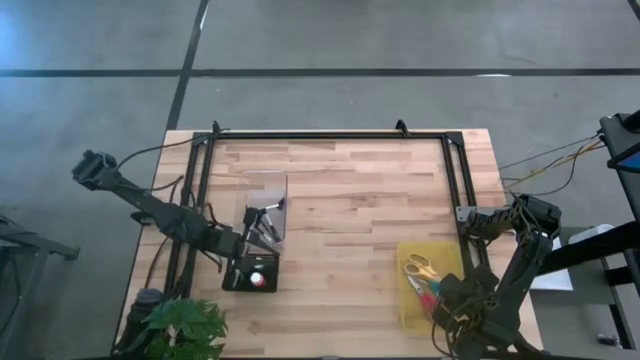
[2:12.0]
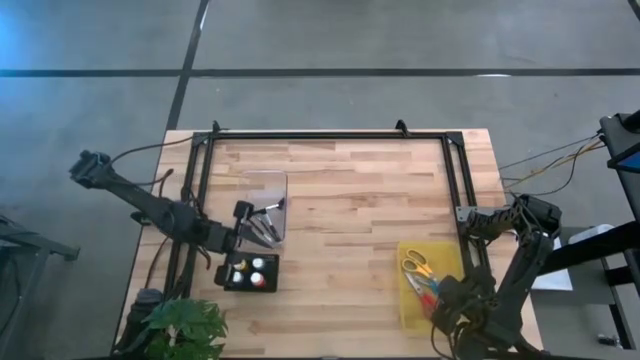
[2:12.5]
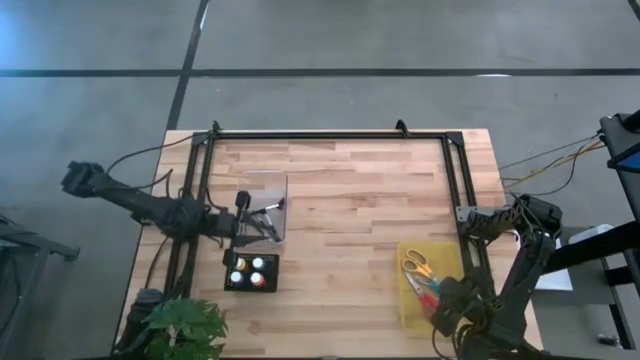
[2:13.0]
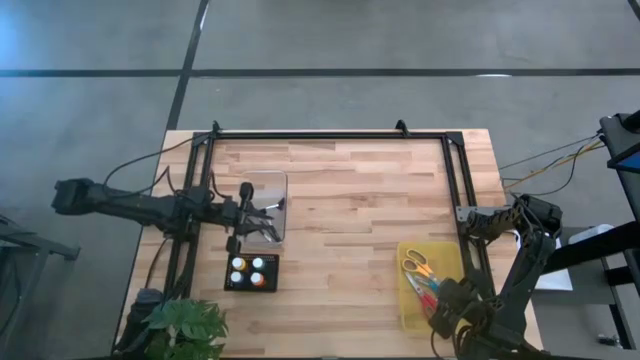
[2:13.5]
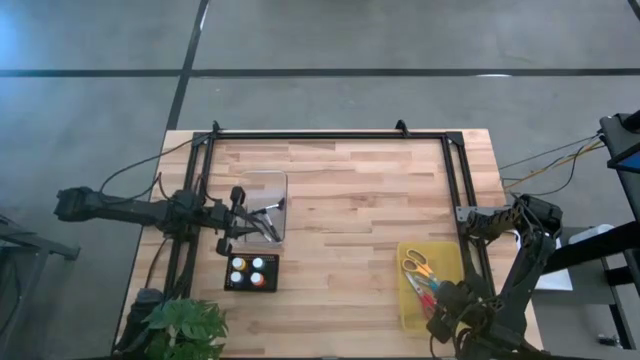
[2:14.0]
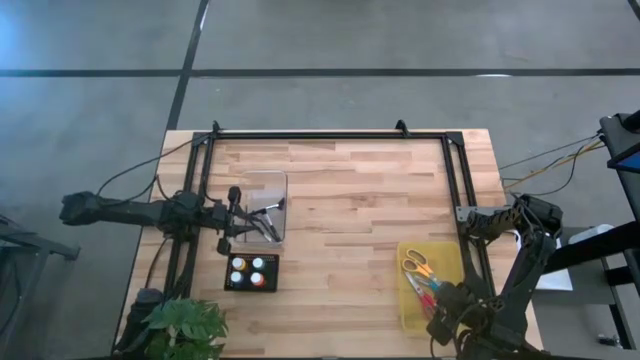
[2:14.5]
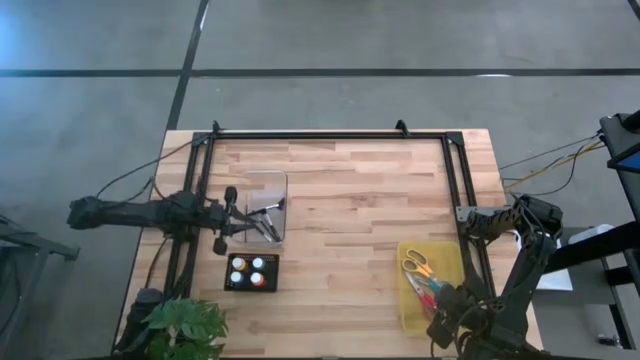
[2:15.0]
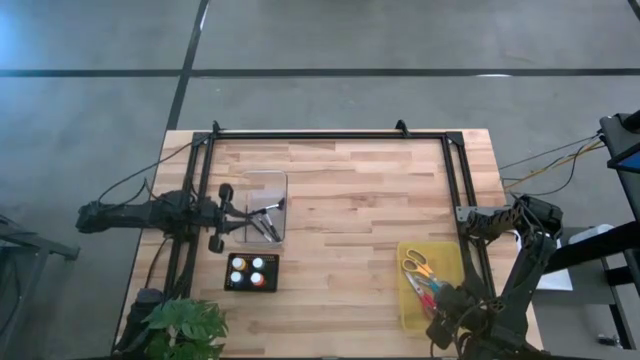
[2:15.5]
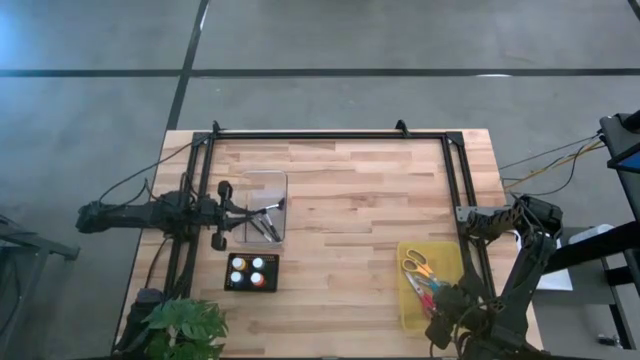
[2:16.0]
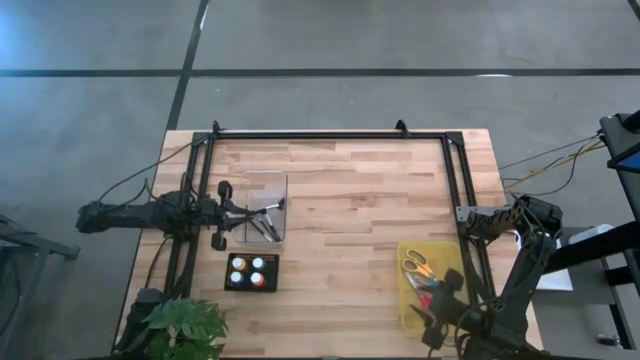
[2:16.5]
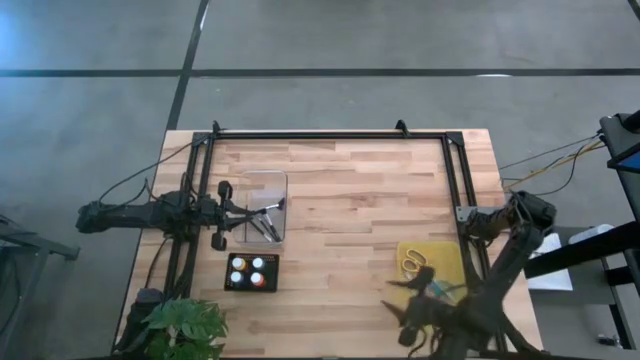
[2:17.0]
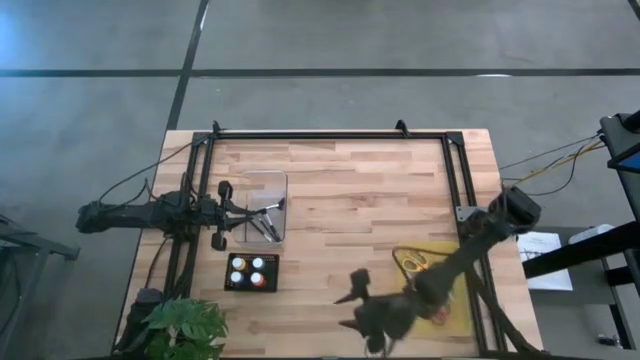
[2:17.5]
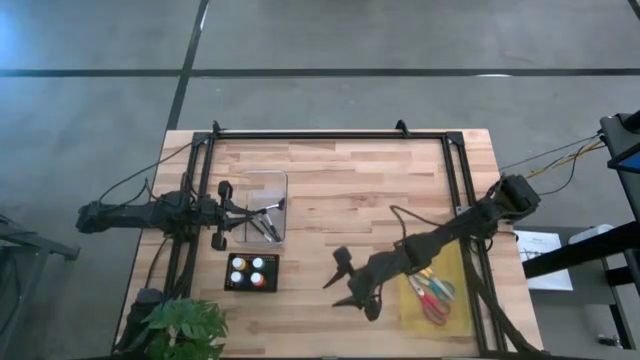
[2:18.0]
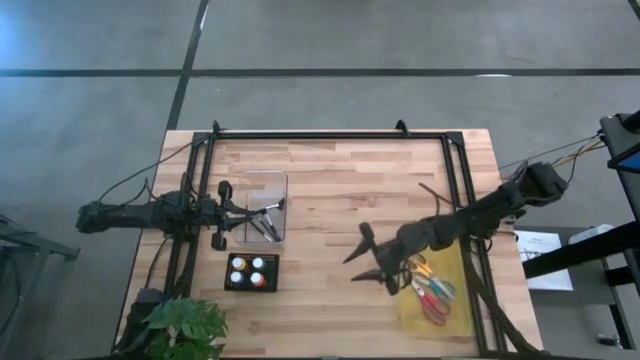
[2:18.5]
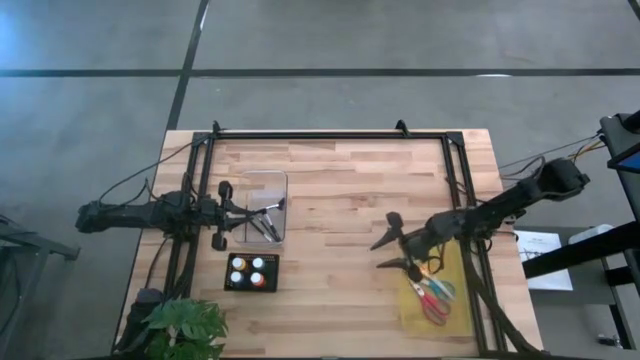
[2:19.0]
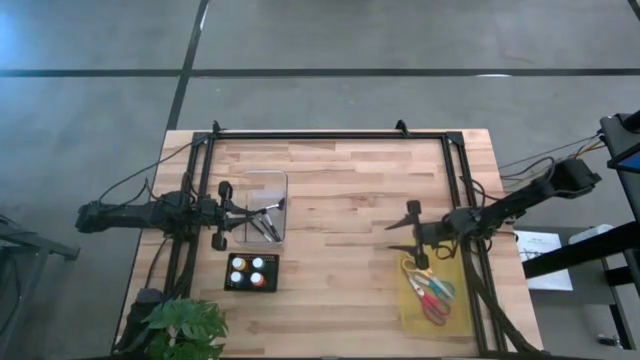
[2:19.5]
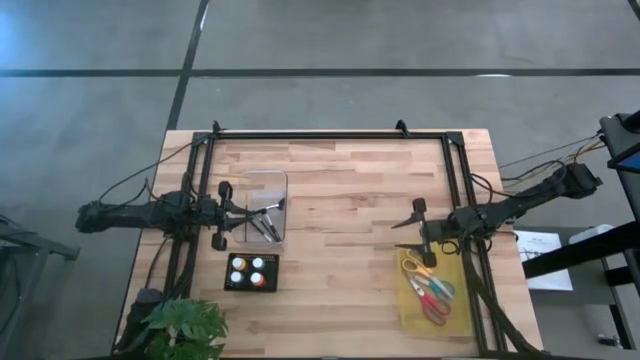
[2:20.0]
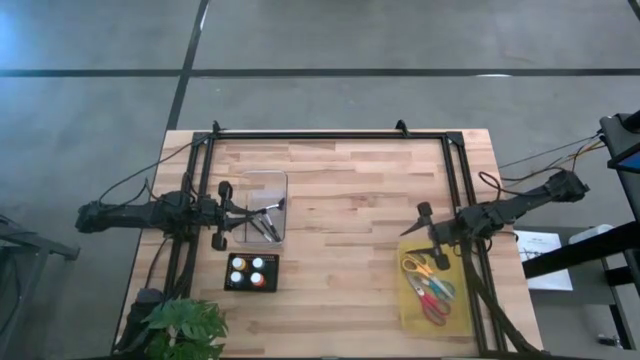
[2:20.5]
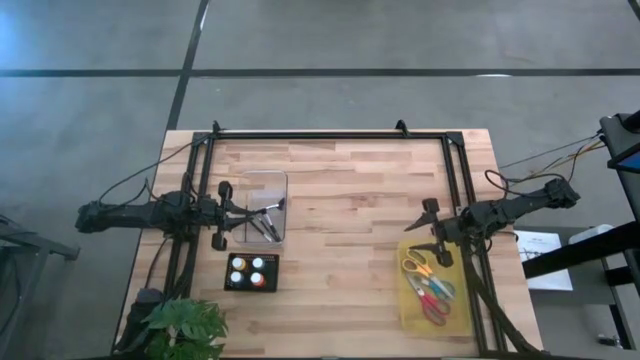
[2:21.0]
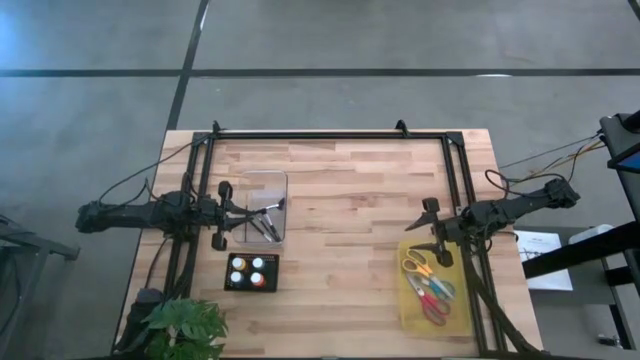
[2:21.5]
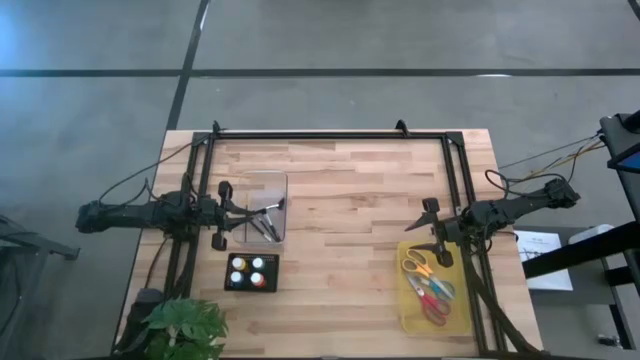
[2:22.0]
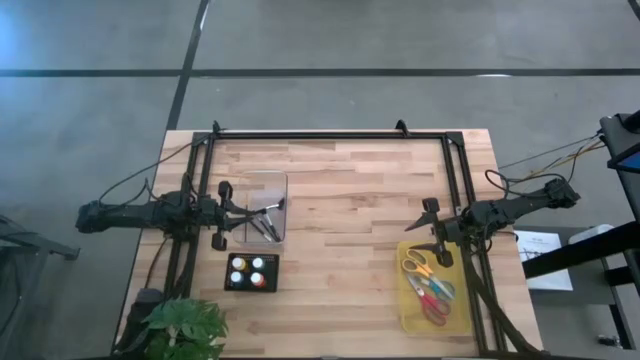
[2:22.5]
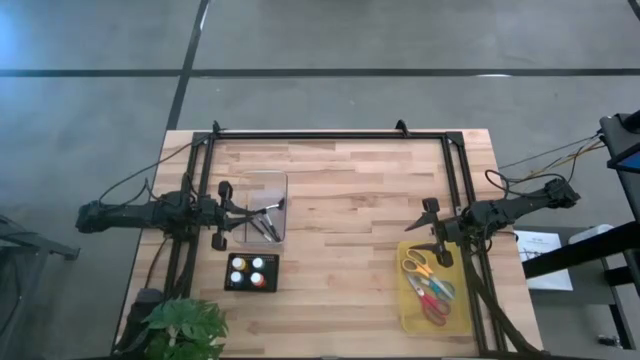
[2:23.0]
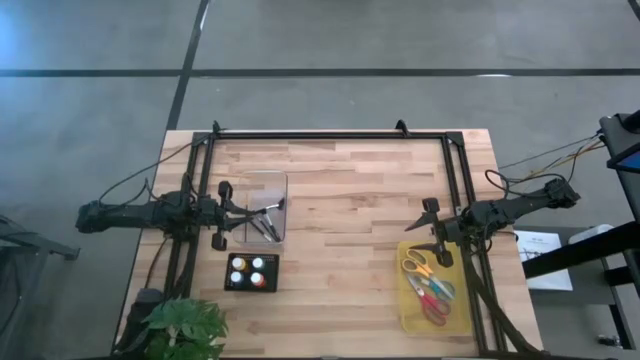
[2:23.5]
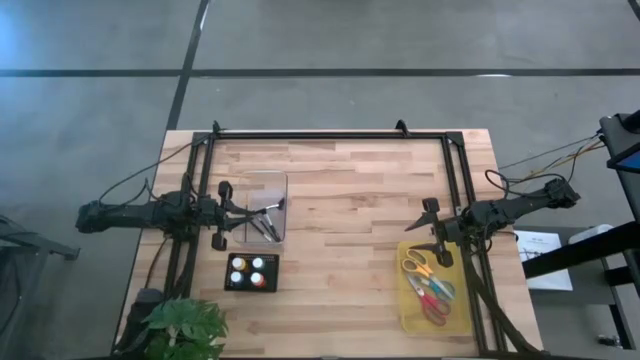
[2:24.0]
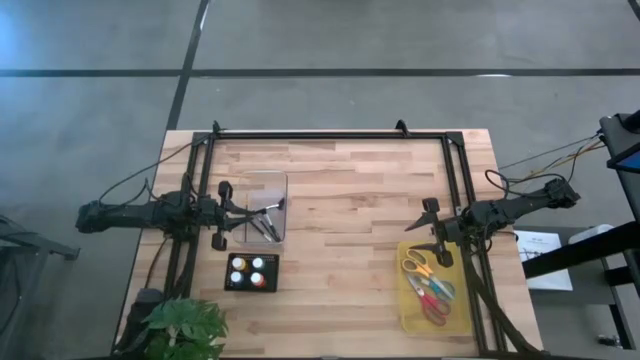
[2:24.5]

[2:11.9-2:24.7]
Task: Pick & Place Paint Supplies
Return to Home Position

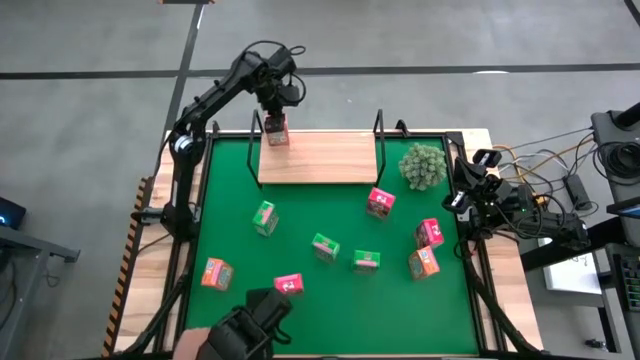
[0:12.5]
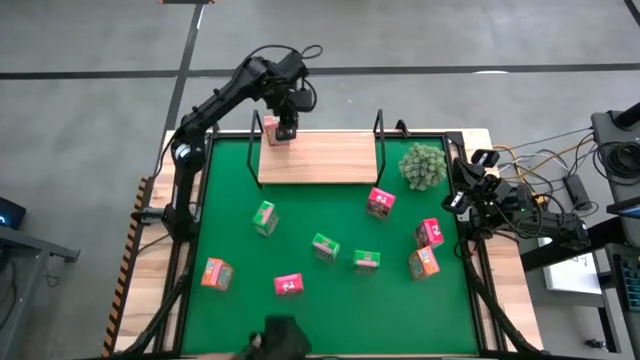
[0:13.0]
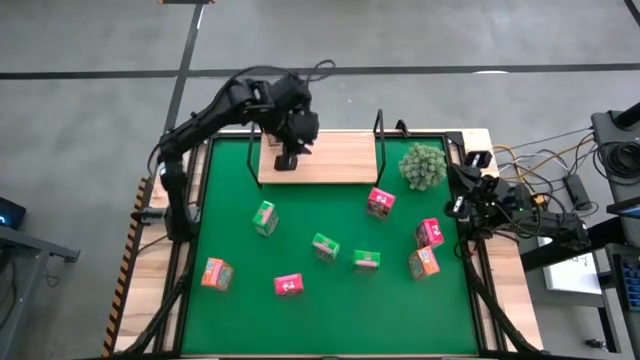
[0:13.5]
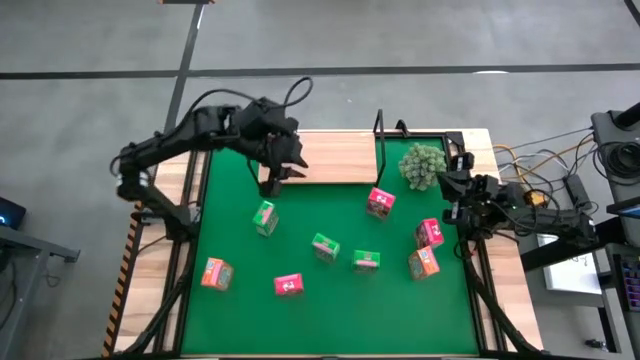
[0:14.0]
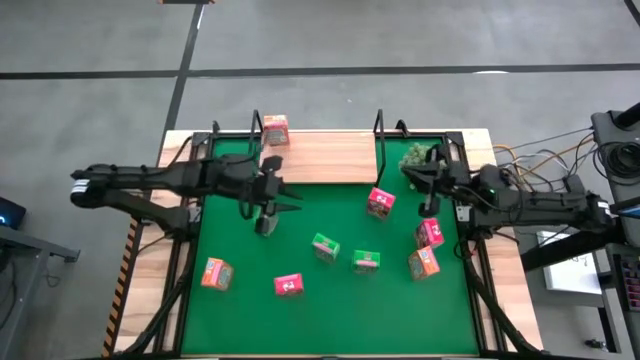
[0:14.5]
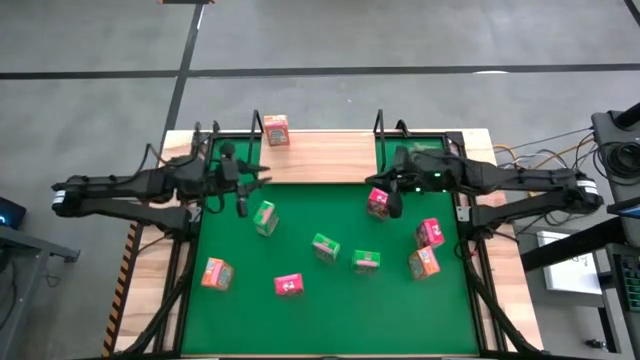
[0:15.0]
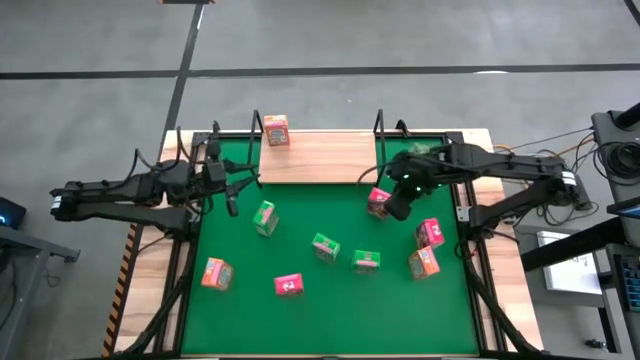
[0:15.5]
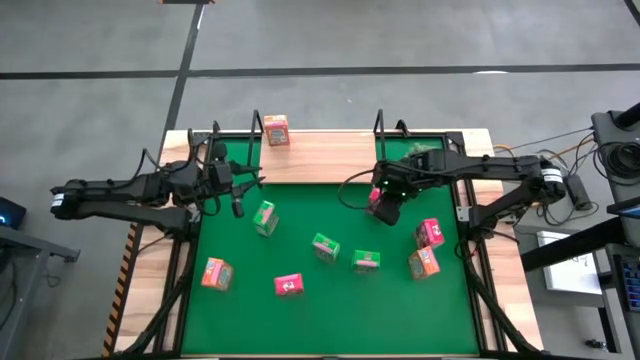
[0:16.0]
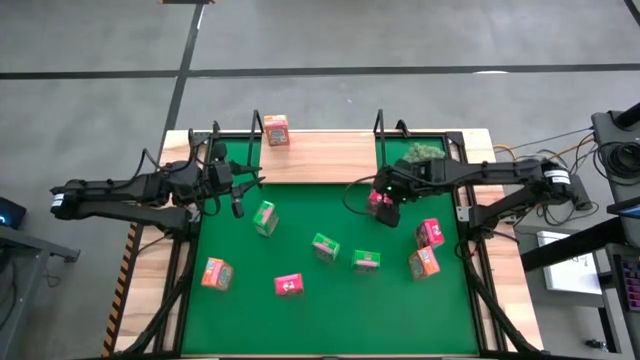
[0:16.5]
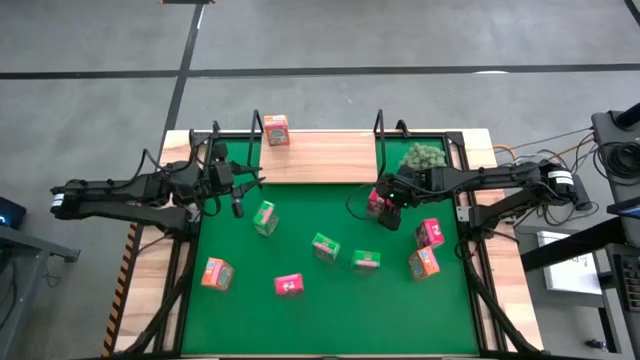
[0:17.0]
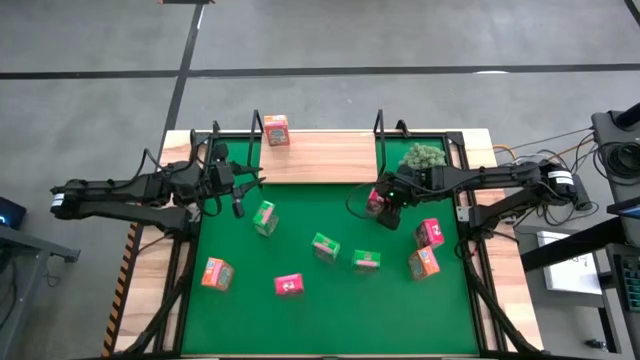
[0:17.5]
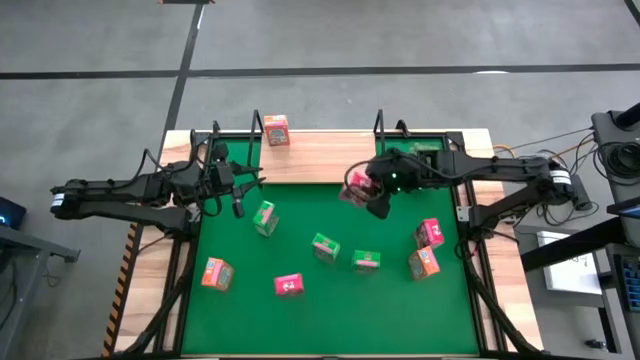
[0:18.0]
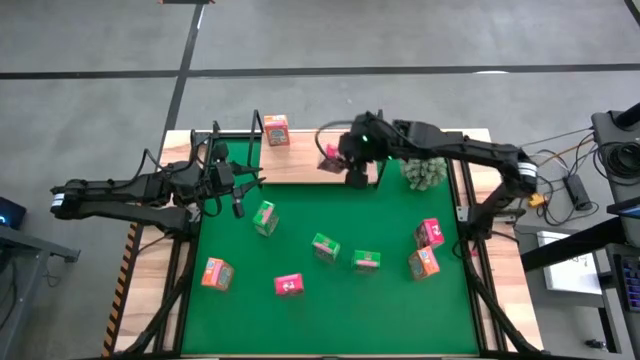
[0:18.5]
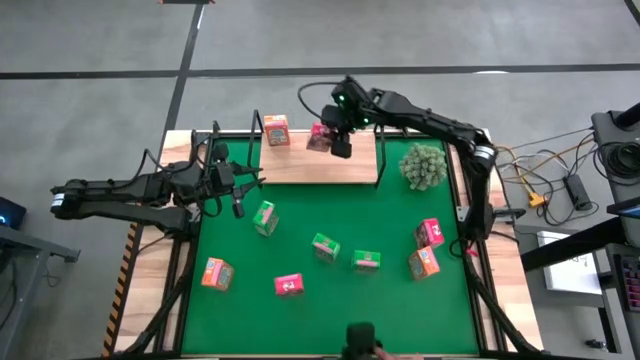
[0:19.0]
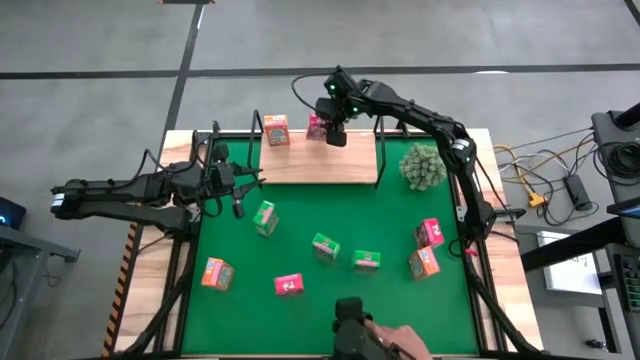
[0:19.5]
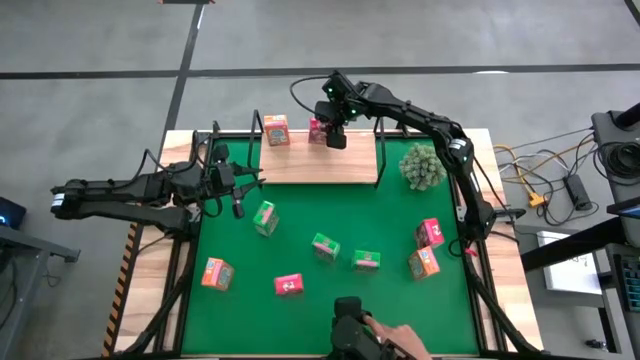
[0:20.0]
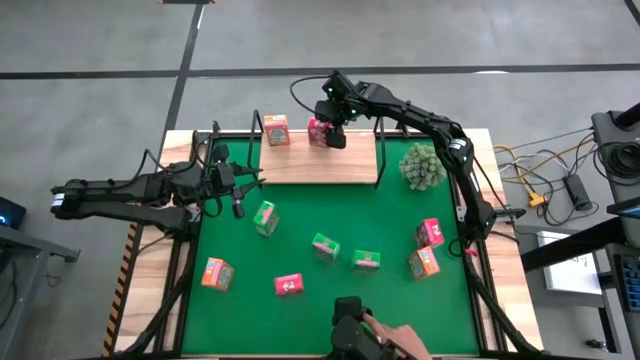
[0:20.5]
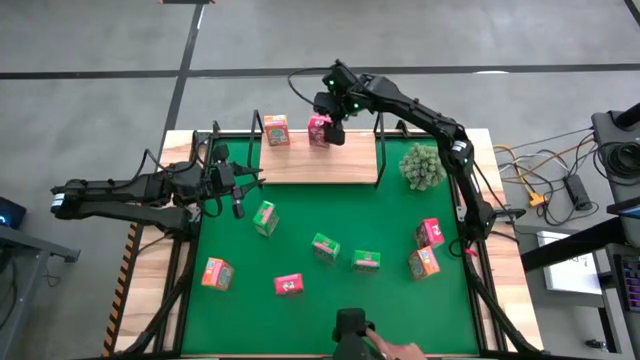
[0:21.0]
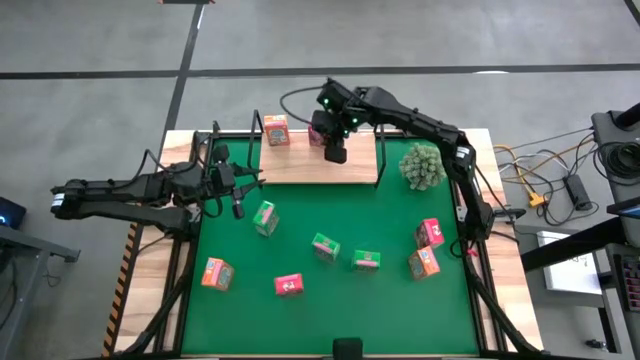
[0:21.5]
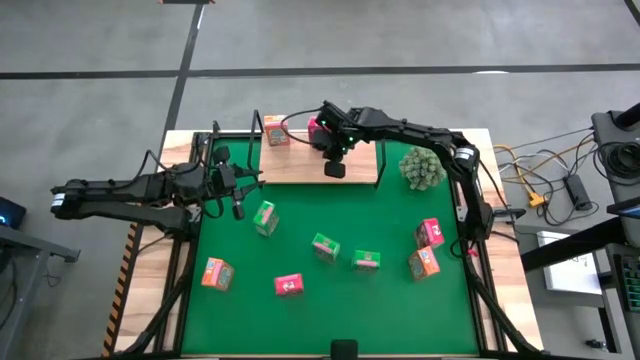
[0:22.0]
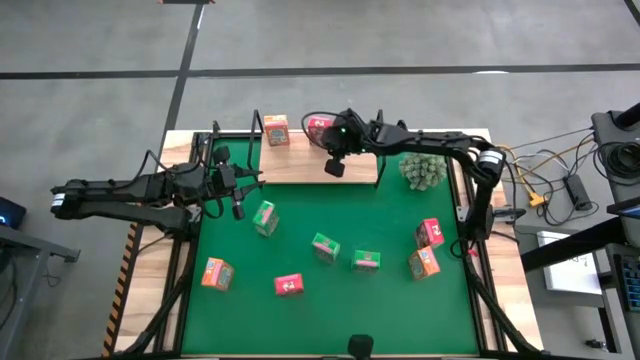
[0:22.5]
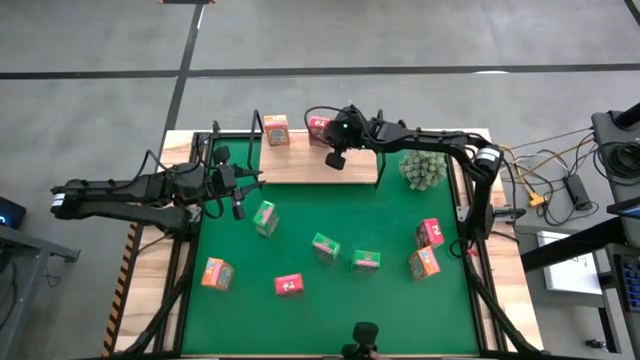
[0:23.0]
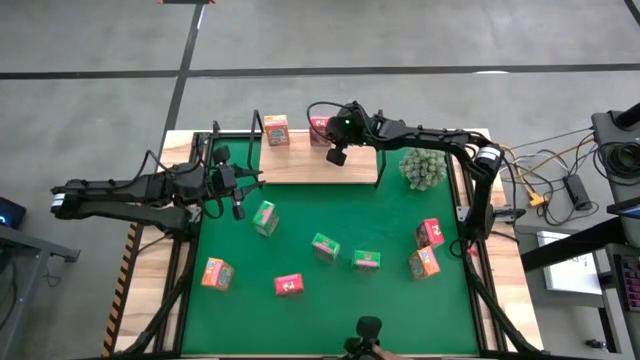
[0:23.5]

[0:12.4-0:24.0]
Task: Stack cereal on shelf
Put the top red cereal box box on the shelf
